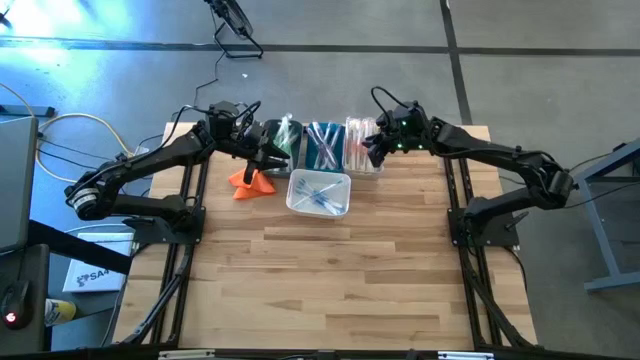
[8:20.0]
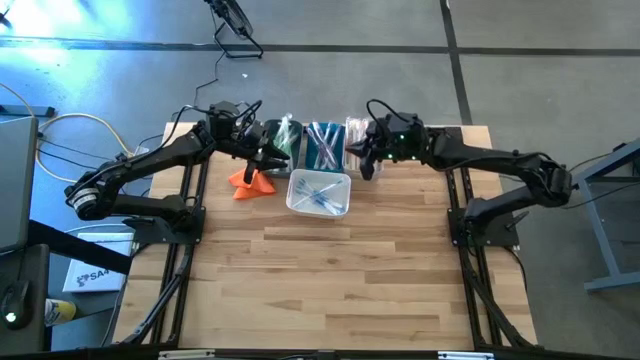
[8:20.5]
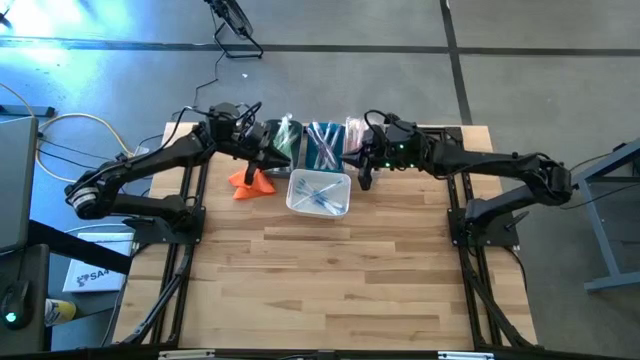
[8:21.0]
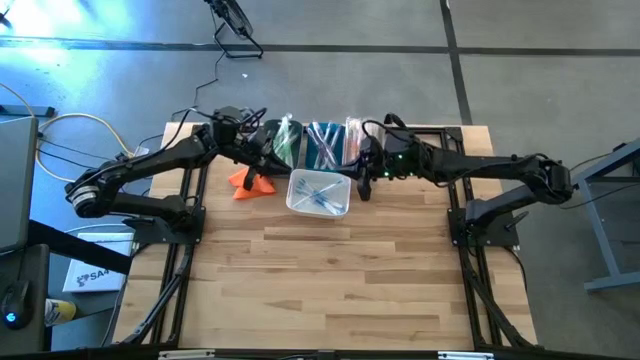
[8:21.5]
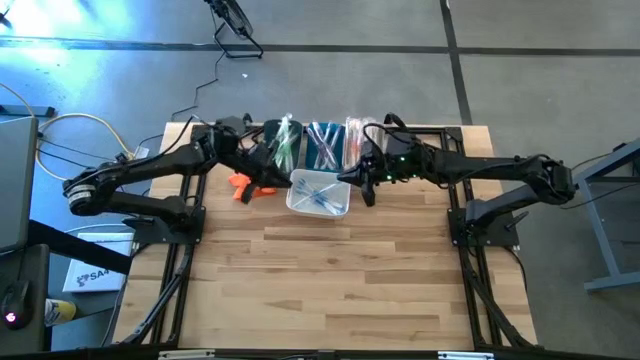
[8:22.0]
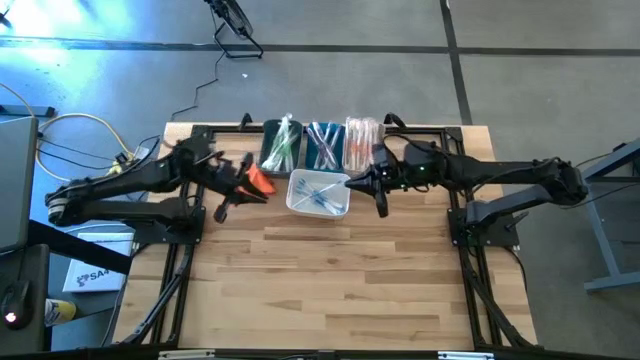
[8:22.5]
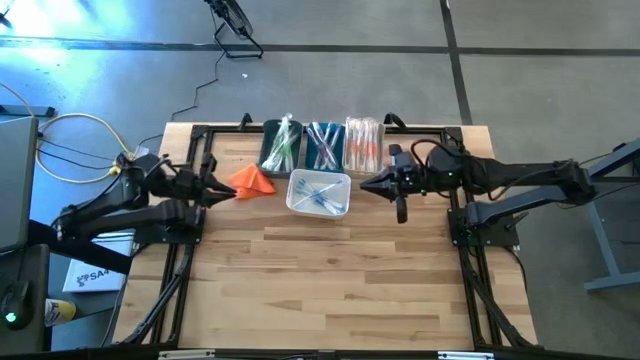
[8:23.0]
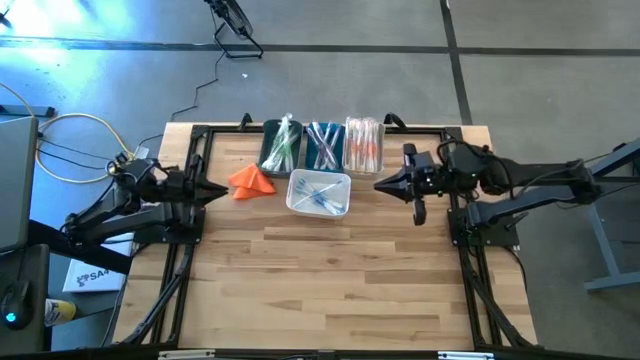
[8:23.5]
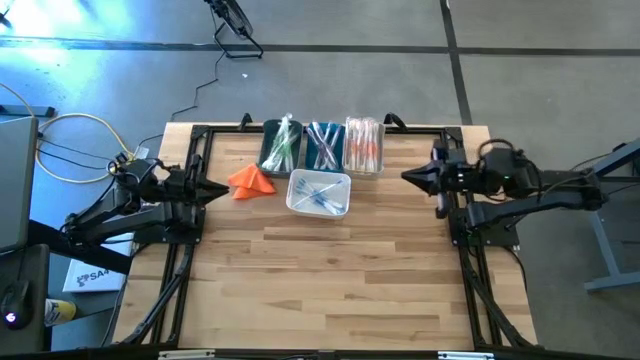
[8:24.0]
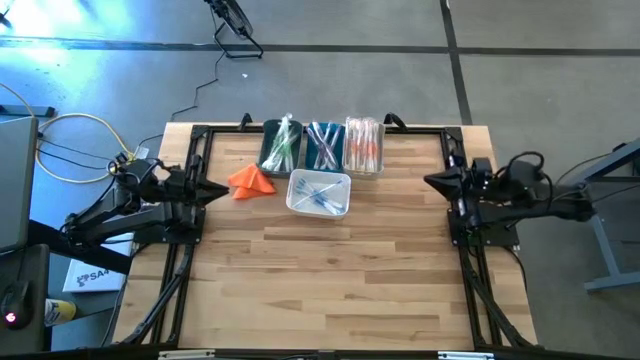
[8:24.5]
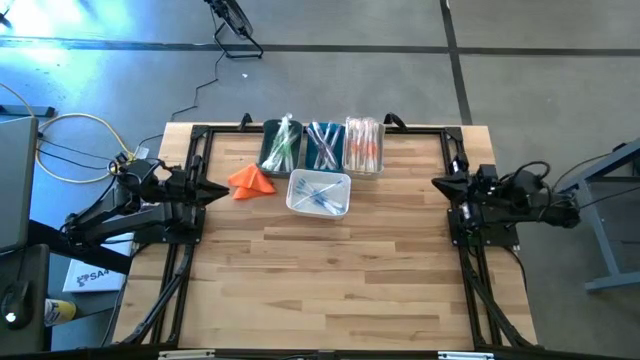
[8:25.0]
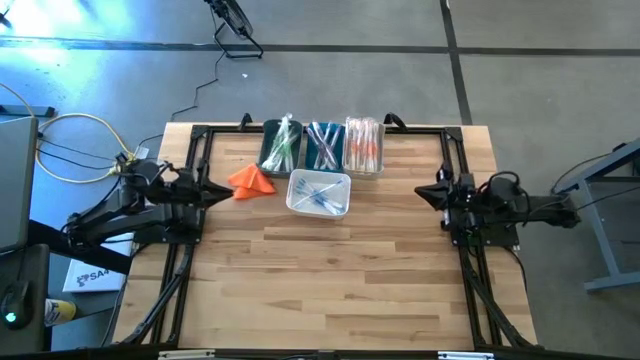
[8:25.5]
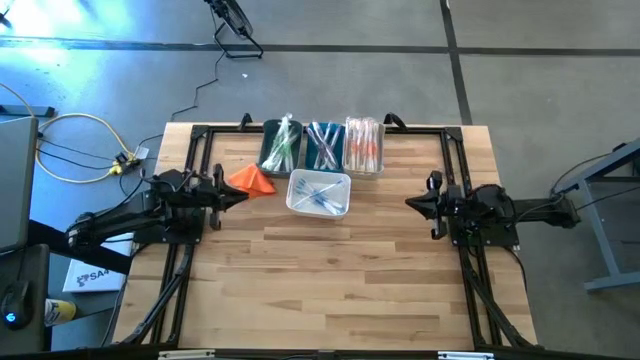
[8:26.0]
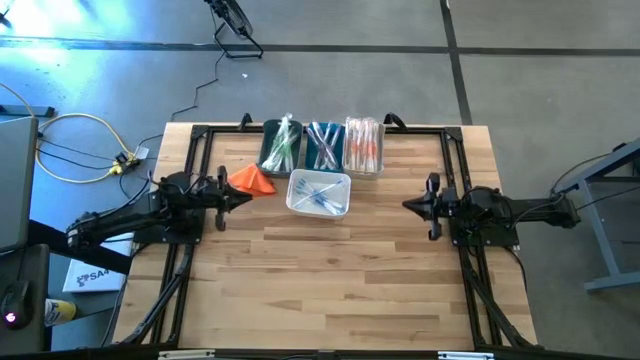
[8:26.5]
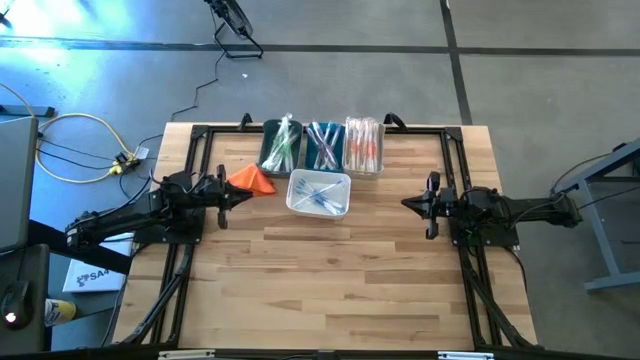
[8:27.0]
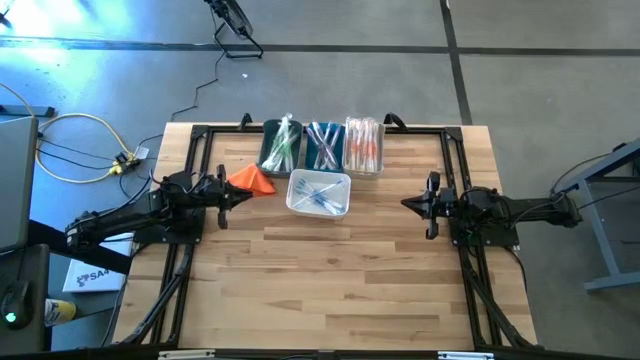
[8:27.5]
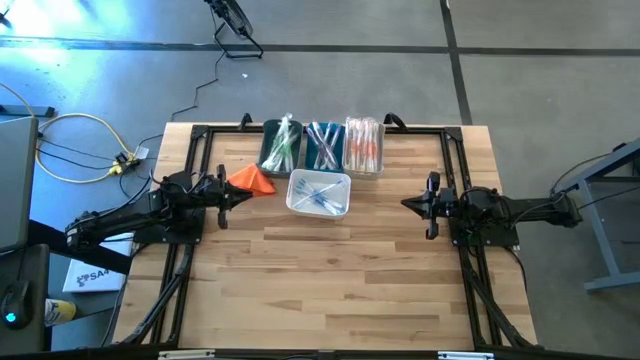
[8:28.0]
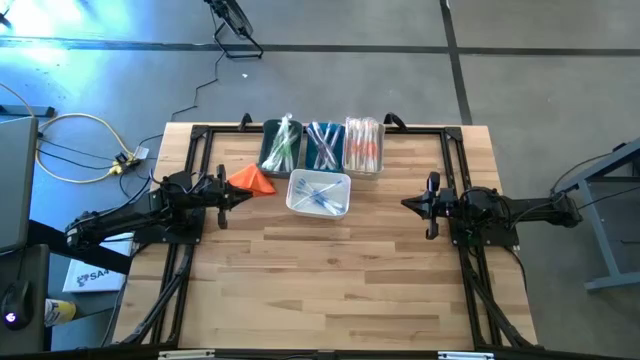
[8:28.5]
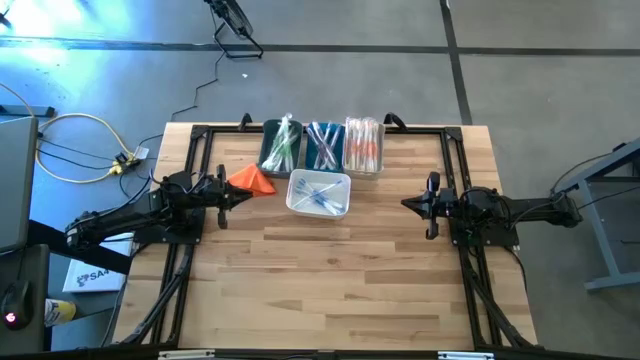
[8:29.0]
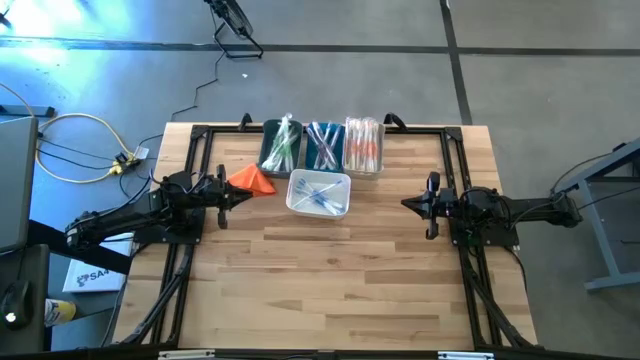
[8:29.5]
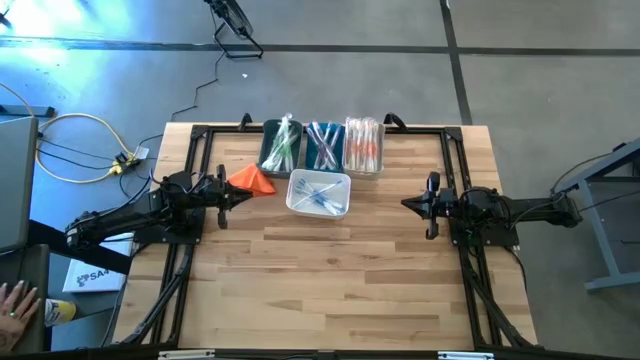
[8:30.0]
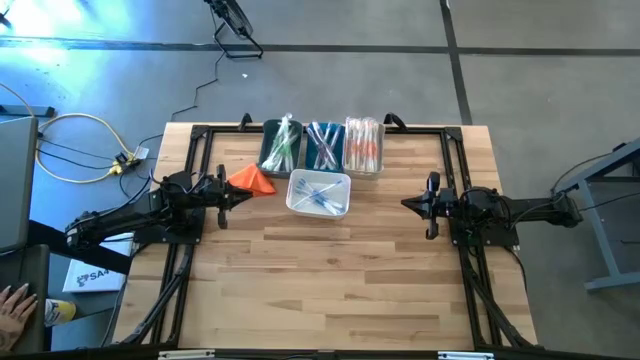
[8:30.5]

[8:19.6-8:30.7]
Task: Pick & Place Toothbrushes
Return to Home Position

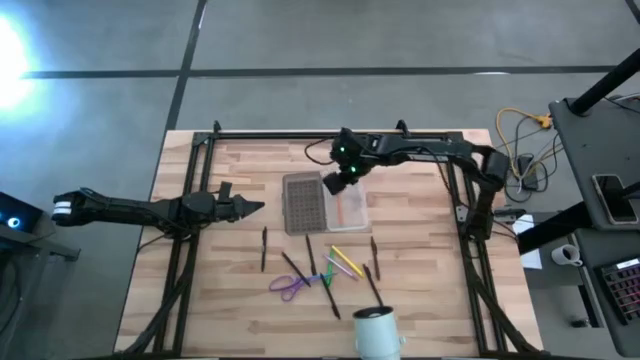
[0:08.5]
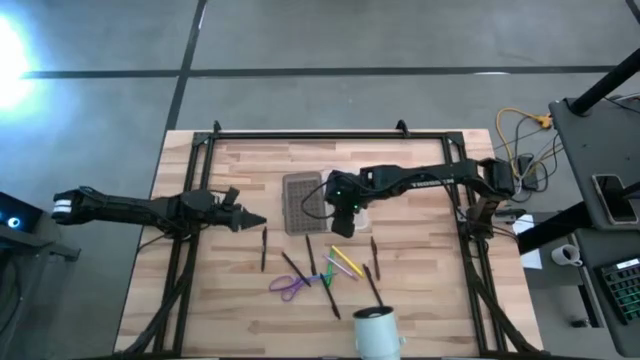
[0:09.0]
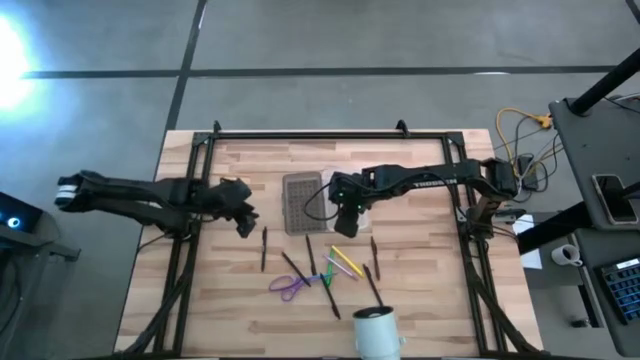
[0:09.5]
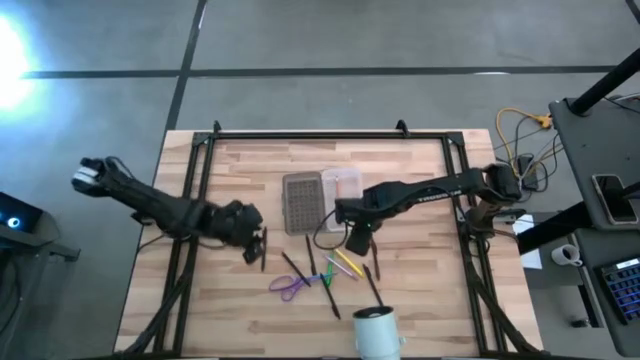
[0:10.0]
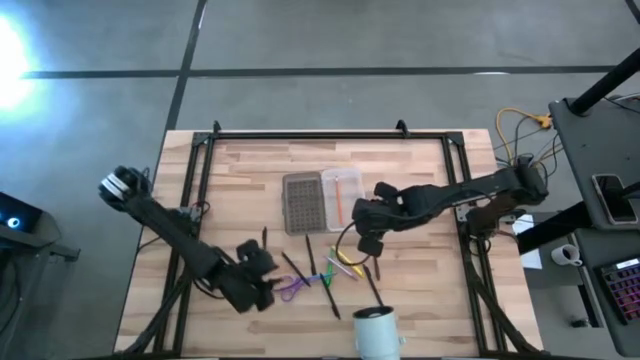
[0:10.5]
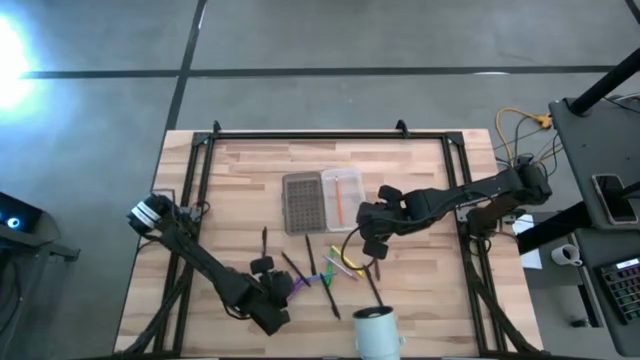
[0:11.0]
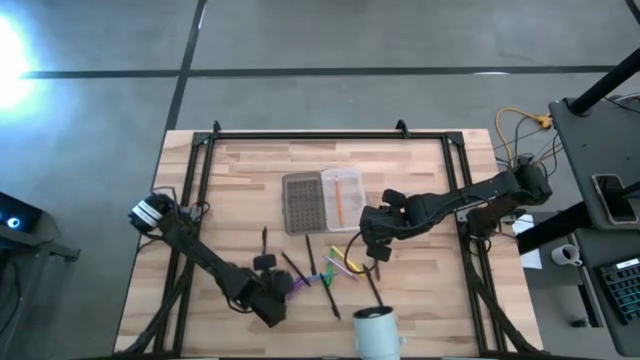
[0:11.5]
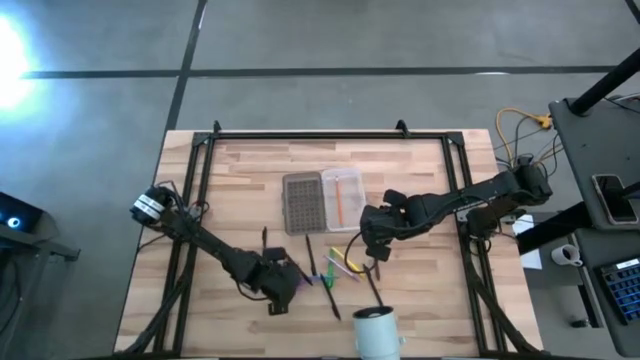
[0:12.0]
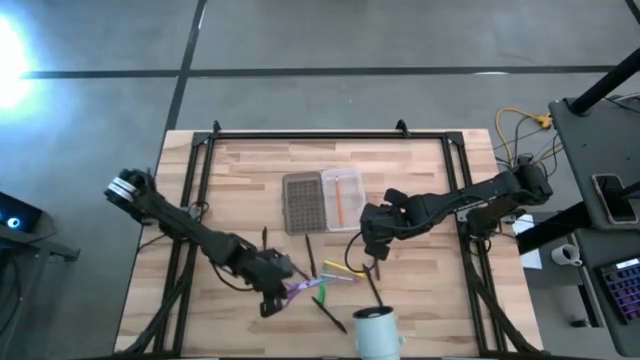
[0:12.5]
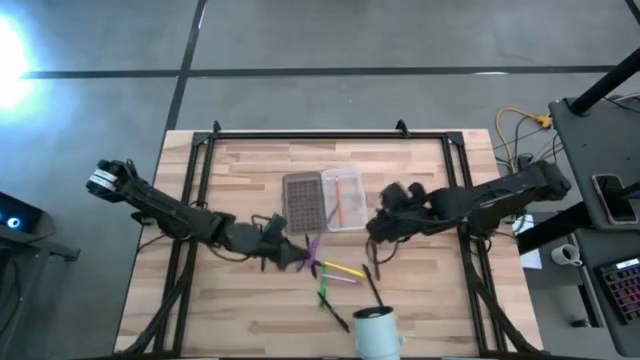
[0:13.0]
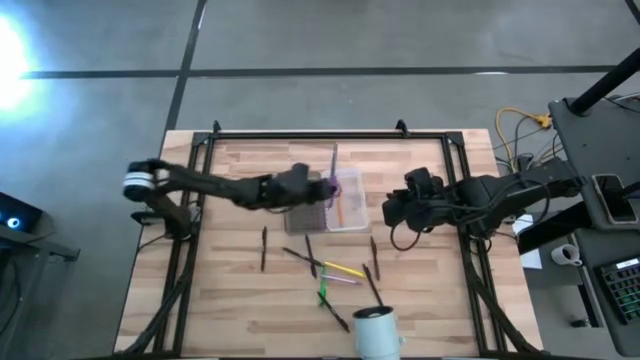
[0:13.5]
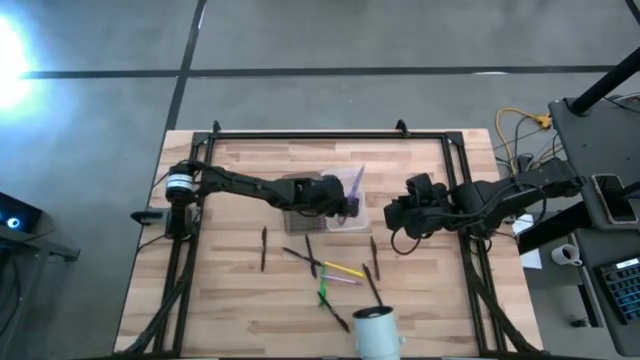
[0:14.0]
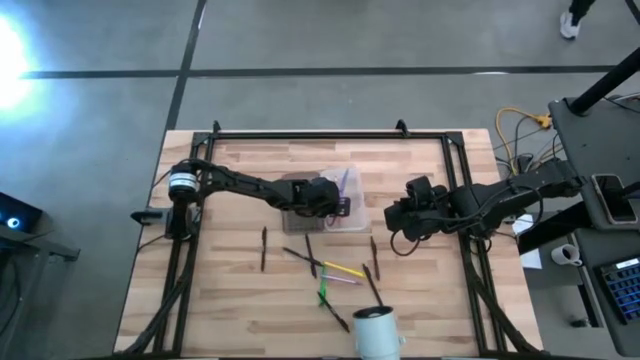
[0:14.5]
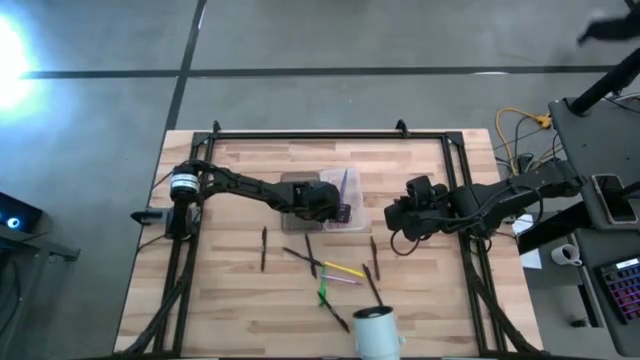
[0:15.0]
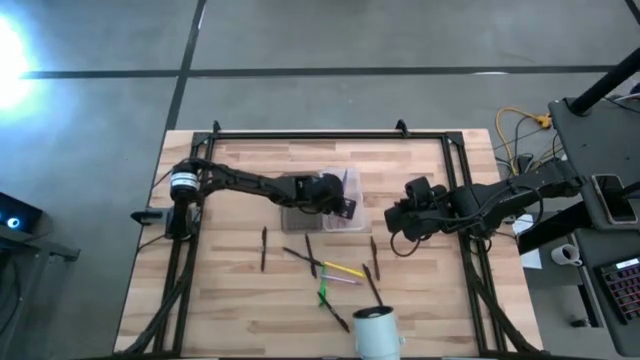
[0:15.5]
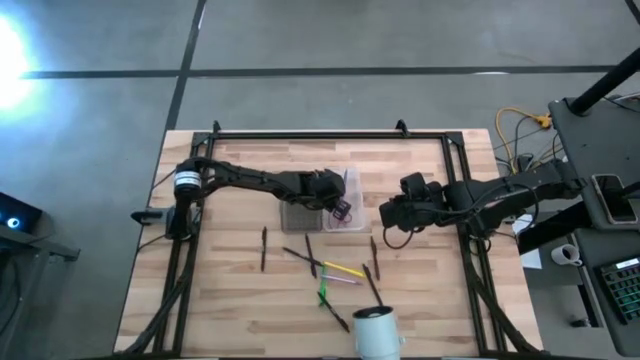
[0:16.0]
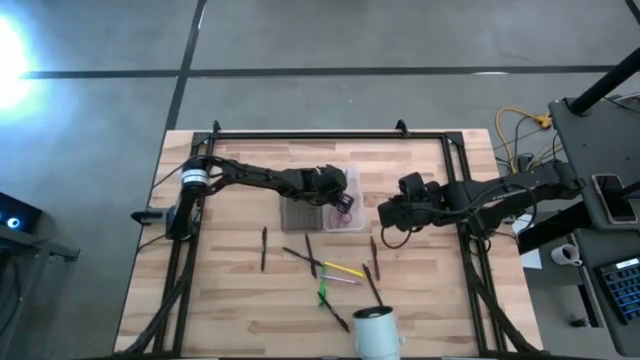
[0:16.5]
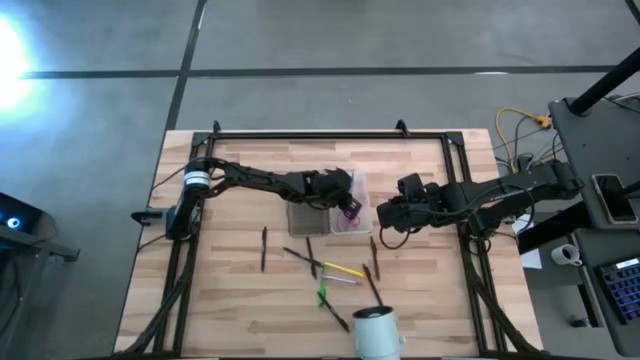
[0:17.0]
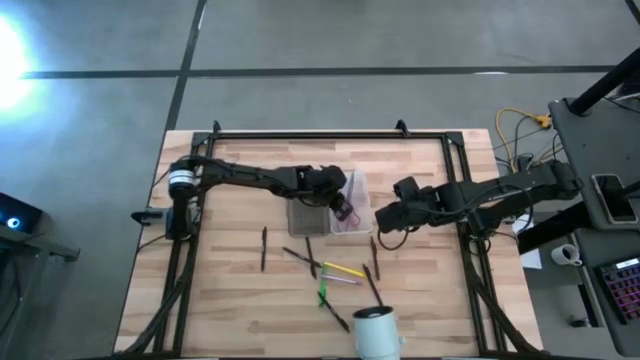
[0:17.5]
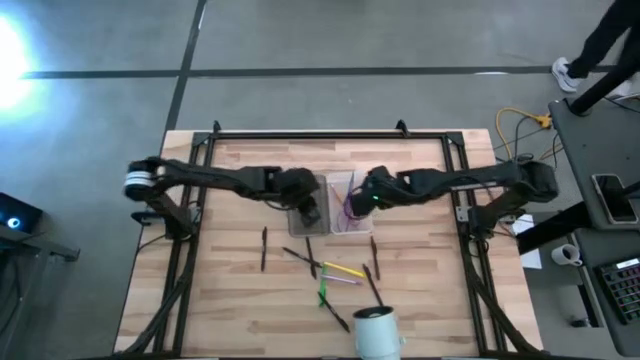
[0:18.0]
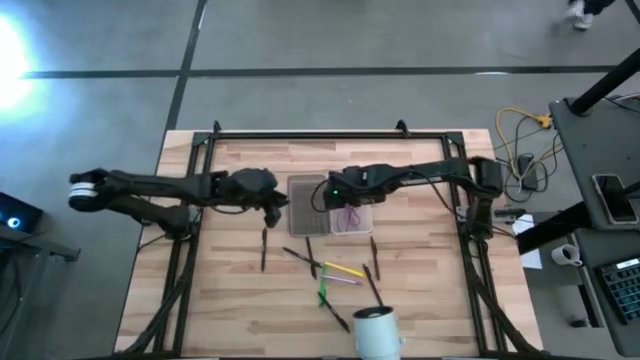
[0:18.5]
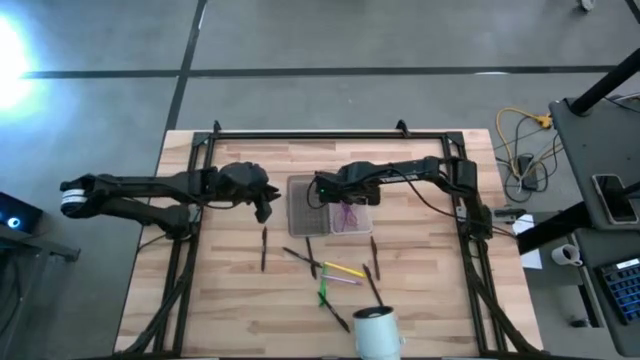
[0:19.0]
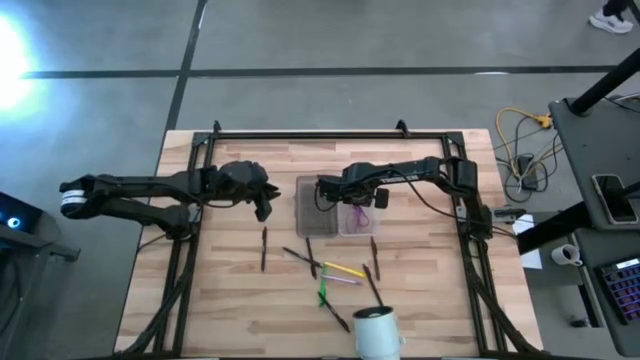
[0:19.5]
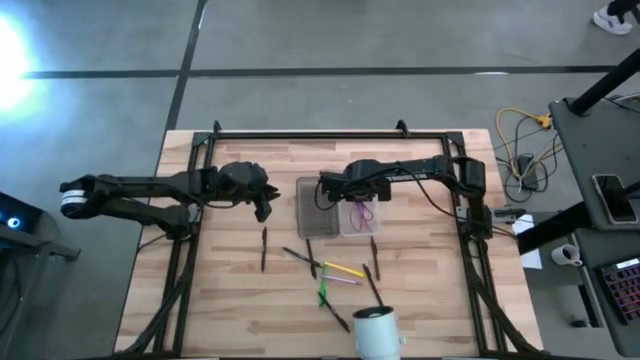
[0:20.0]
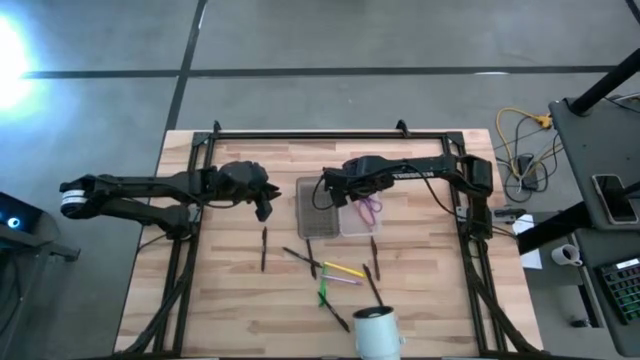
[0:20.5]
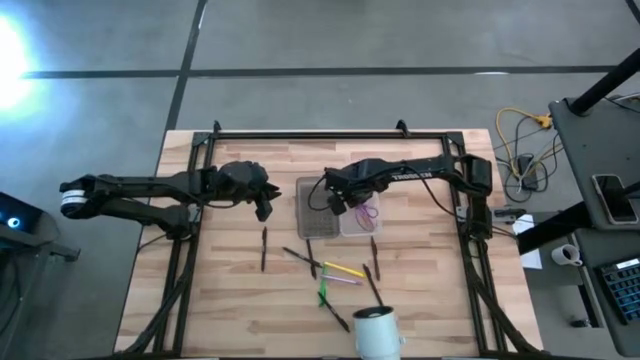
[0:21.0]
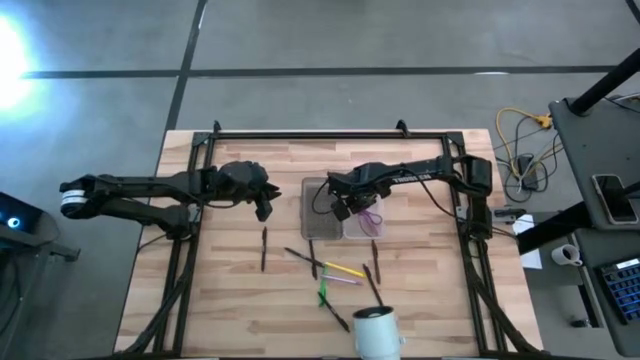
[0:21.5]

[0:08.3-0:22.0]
Task: Pick & place school supplies into a supply box
Put the purple scissors into the gray supply box
